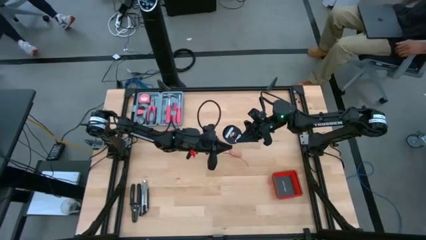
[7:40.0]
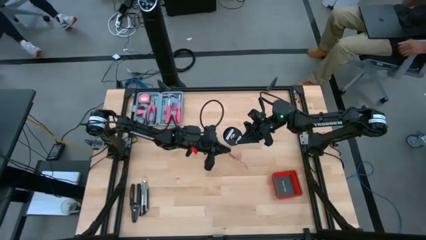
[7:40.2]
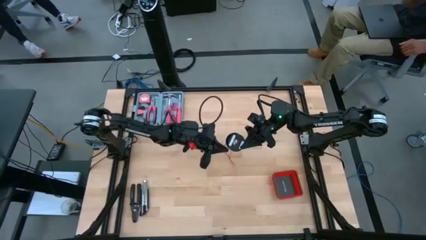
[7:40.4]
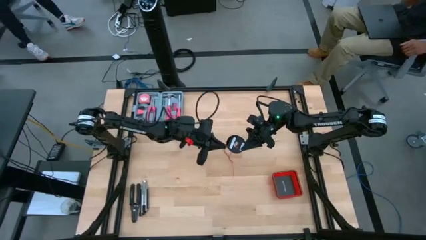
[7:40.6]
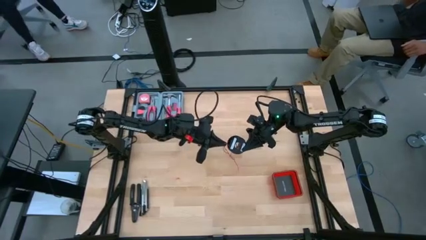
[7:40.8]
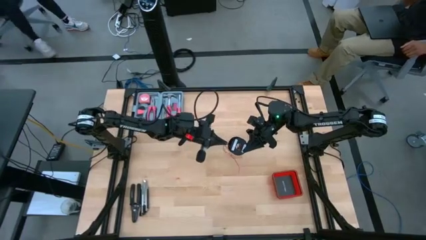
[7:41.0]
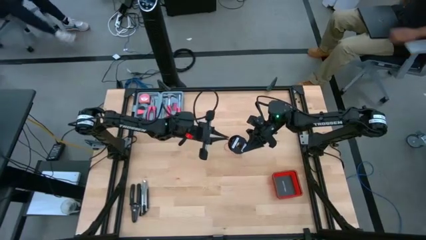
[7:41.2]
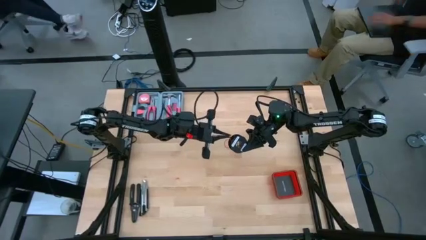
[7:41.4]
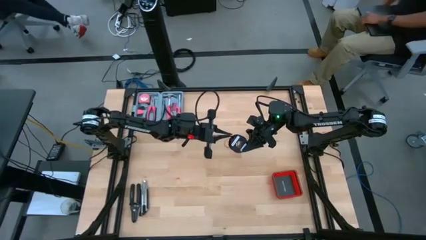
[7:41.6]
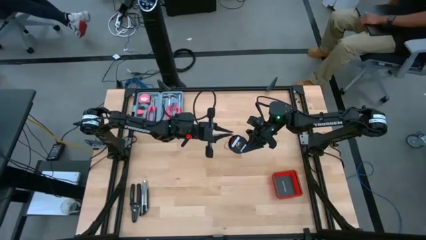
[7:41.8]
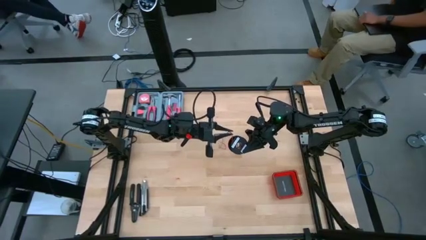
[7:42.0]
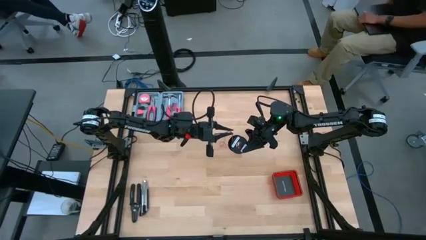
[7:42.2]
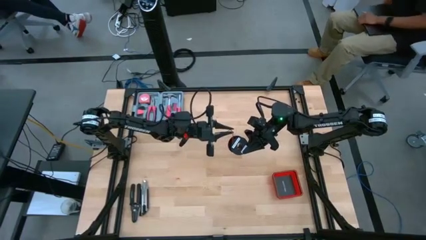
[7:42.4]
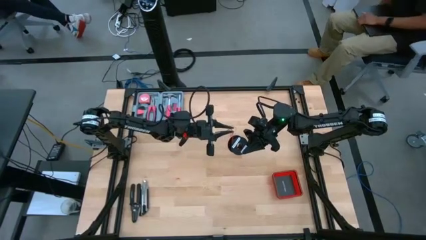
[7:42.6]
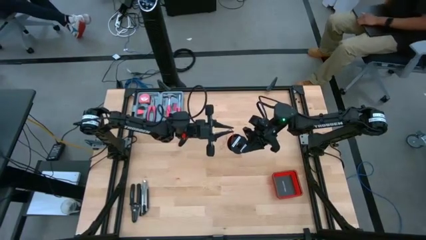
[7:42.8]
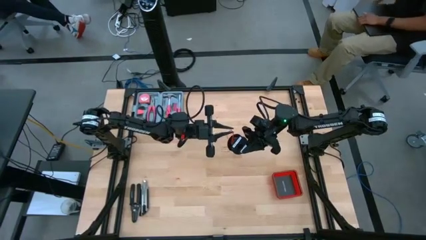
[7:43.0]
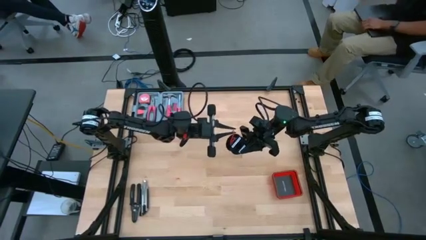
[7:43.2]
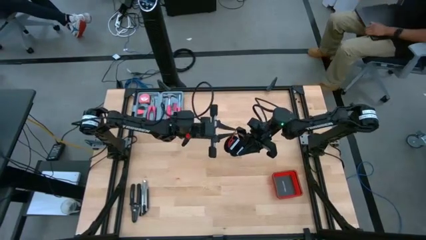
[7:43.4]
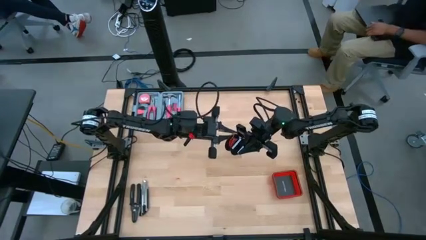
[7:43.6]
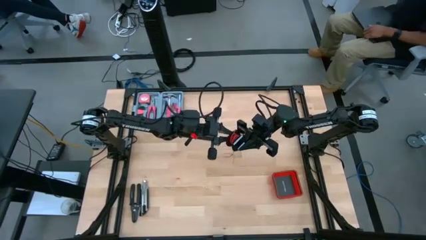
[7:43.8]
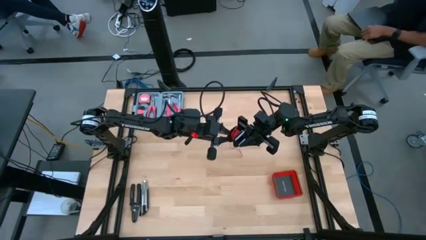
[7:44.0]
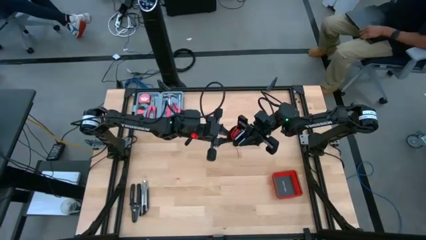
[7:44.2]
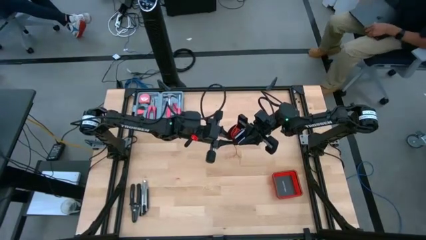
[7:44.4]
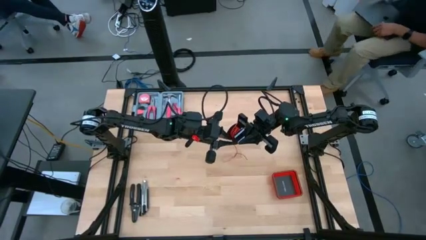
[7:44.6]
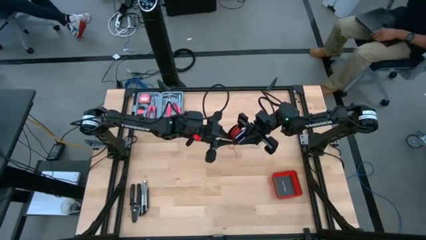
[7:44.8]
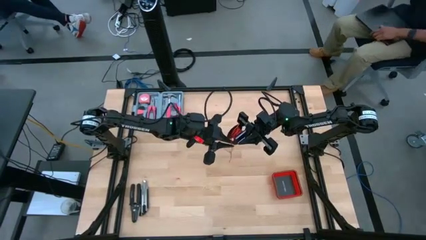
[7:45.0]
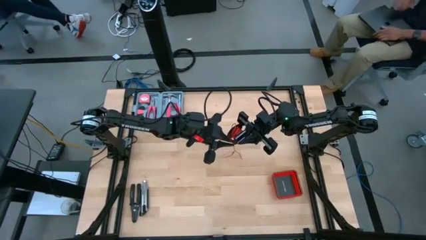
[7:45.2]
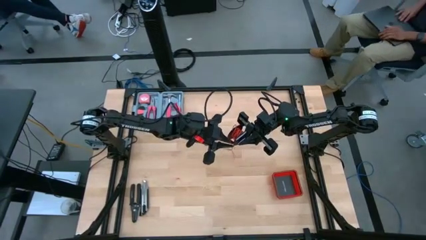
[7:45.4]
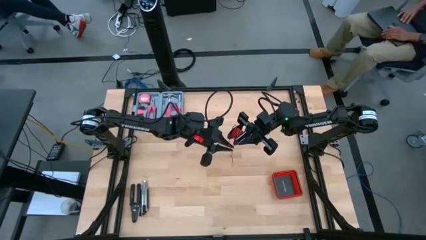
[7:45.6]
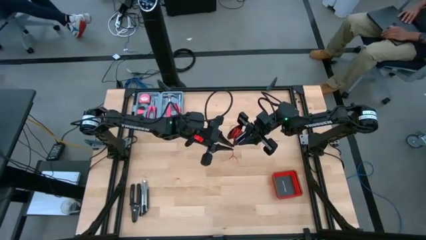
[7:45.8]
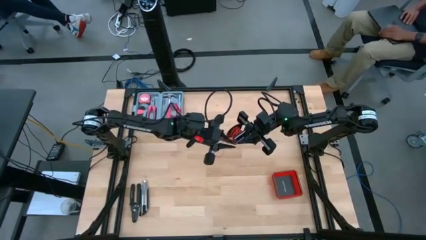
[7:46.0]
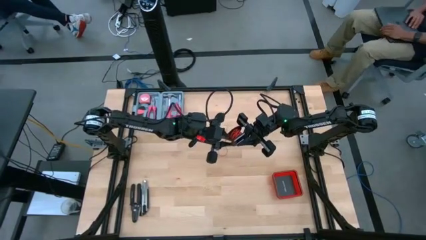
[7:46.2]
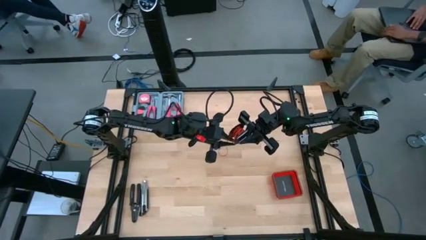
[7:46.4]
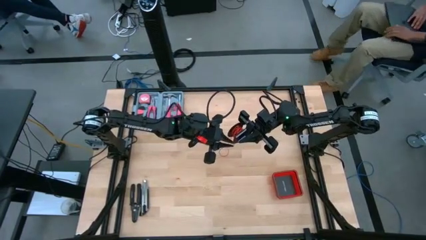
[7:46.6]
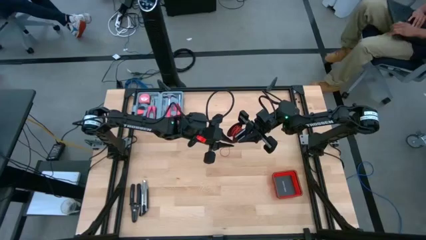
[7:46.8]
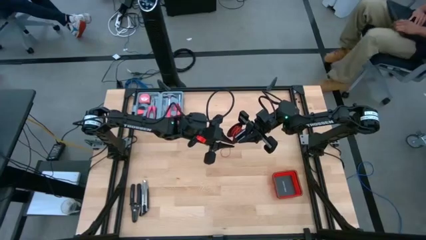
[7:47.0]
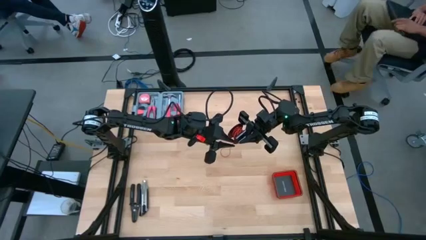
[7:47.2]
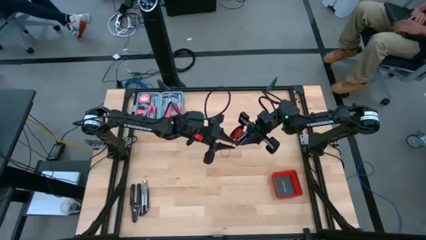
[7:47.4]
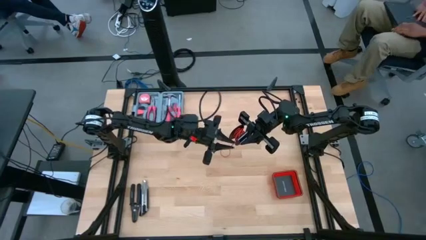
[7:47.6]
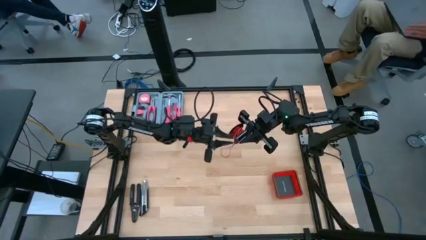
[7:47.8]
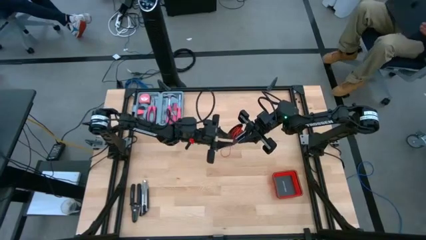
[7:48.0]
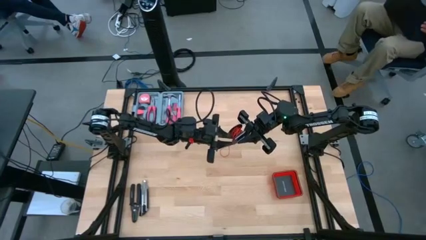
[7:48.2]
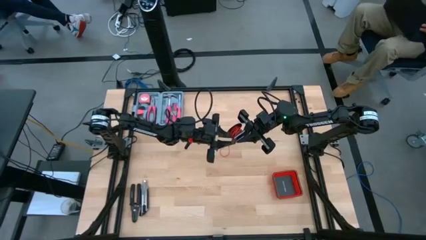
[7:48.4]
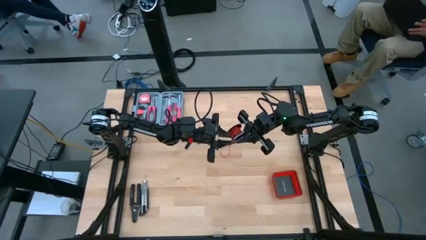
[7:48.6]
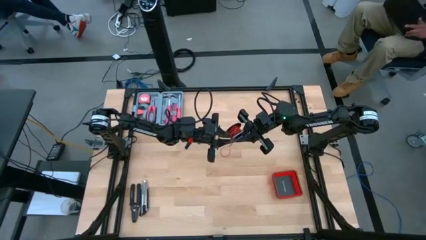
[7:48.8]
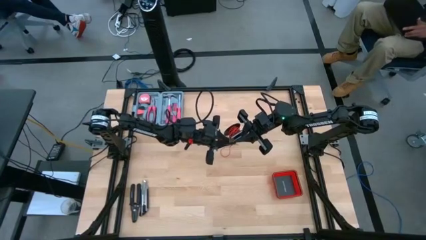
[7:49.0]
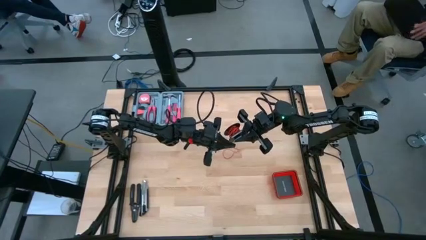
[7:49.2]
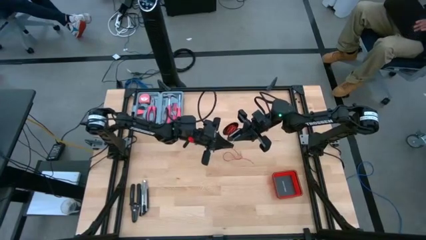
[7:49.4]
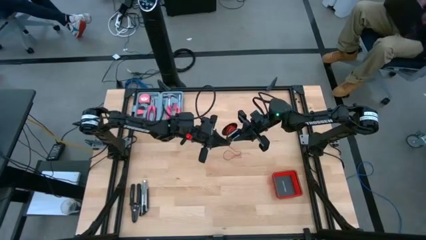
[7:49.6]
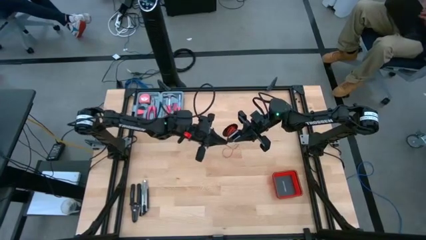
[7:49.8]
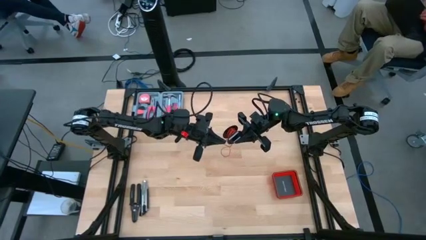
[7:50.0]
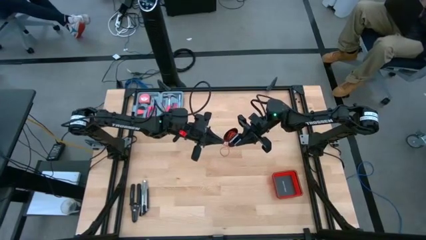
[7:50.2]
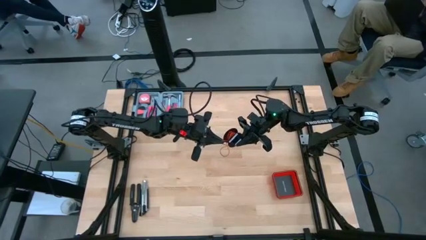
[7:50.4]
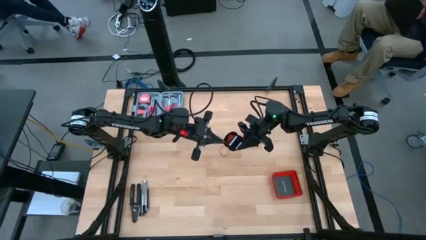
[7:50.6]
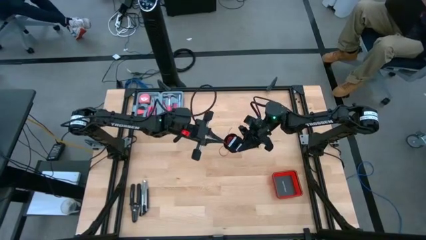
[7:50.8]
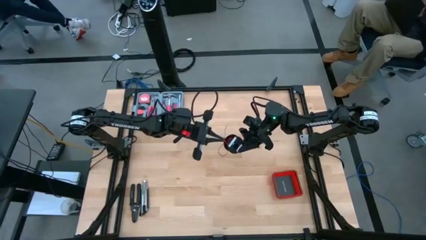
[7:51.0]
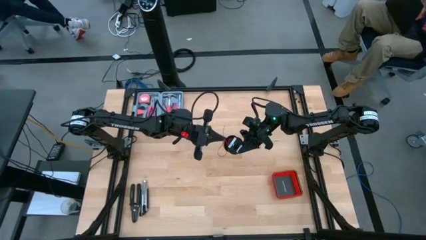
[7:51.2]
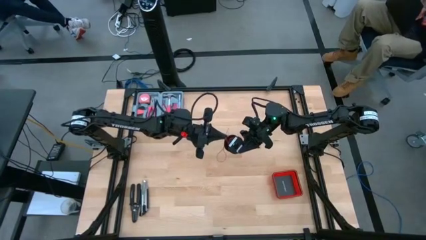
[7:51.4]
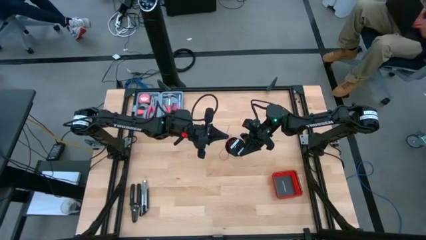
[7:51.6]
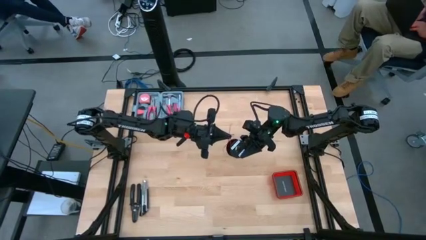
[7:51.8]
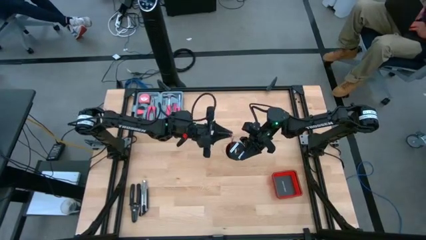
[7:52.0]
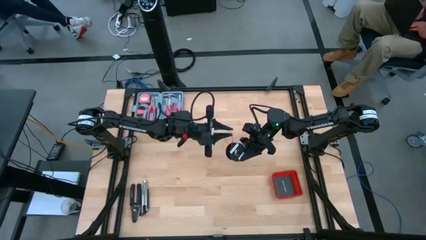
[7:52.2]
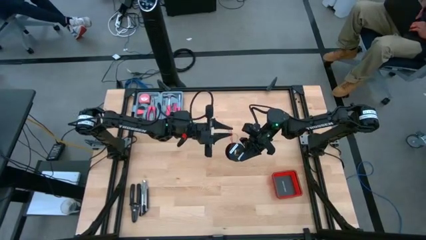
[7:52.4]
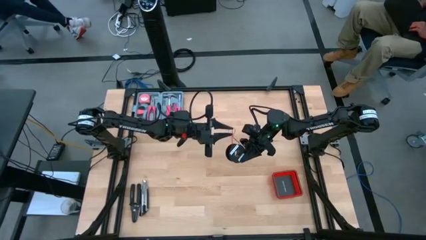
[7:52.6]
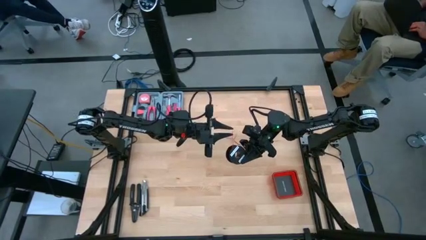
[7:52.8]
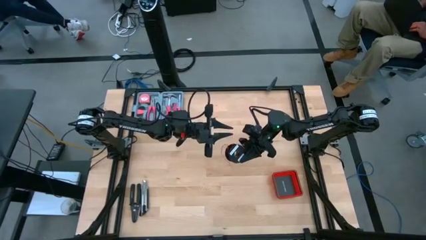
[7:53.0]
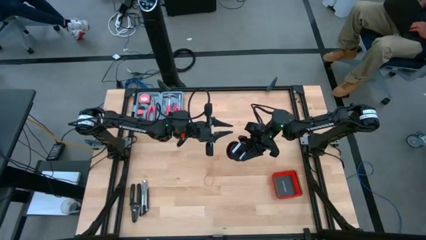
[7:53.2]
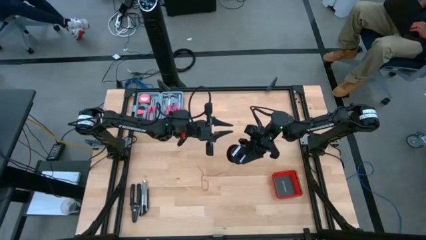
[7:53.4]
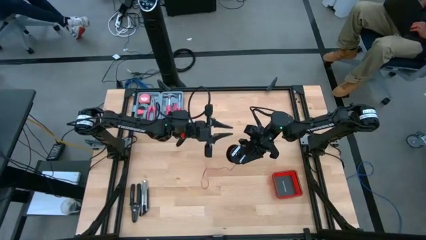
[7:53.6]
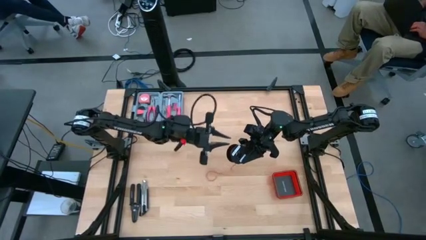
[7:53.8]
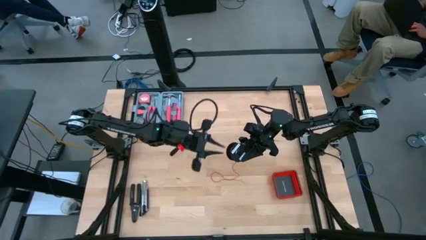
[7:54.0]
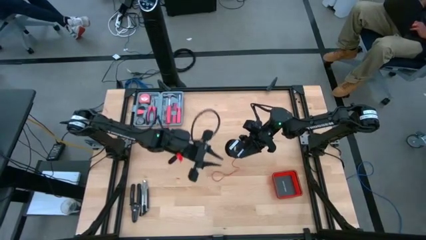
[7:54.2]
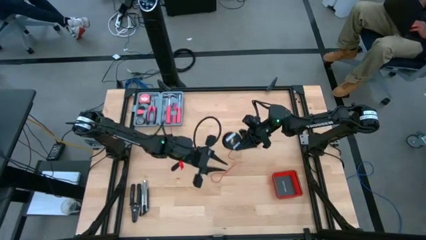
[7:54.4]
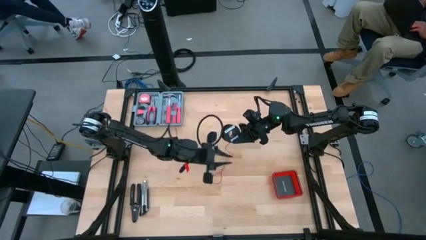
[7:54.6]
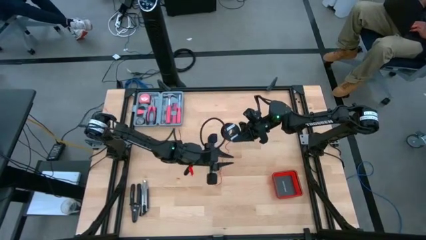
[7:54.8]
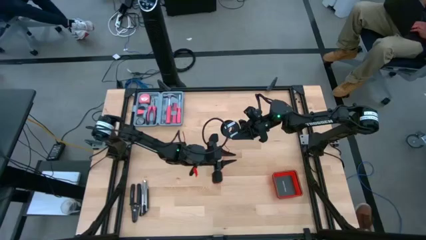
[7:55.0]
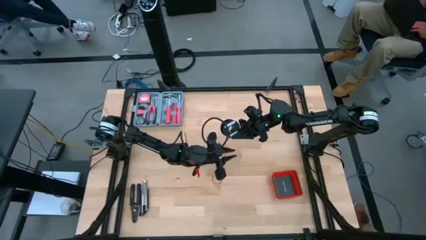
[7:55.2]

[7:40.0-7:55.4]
Task: Coil cords
Coil the red wire onto the spool
